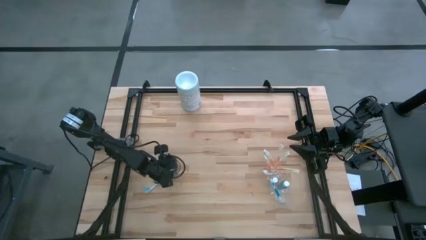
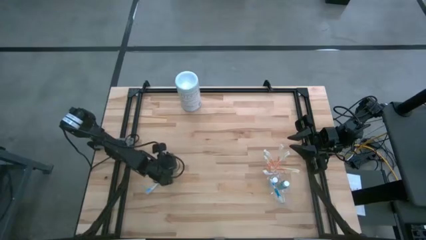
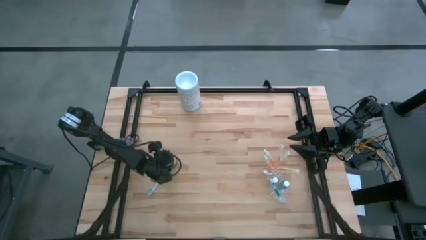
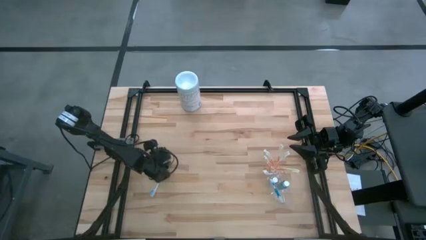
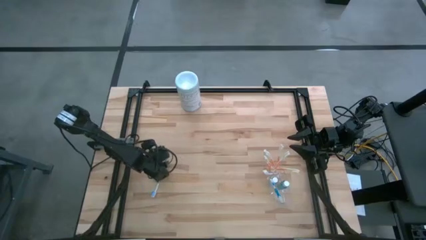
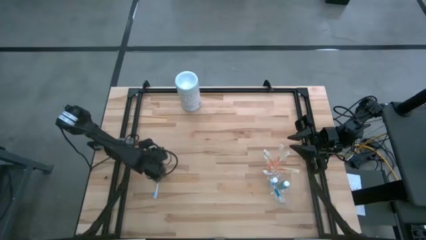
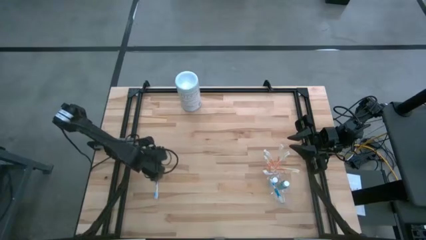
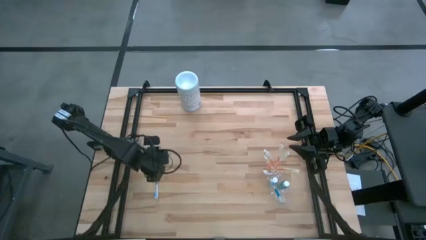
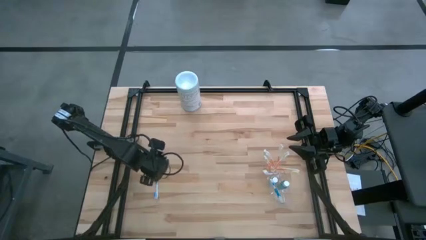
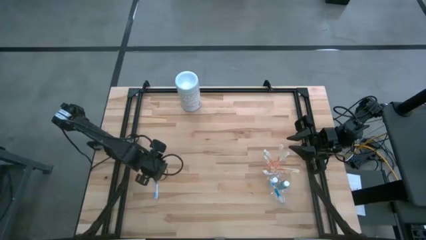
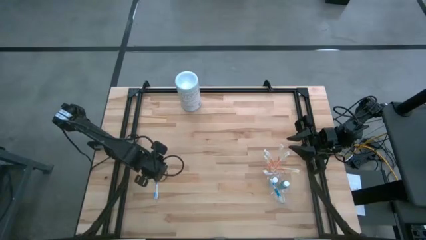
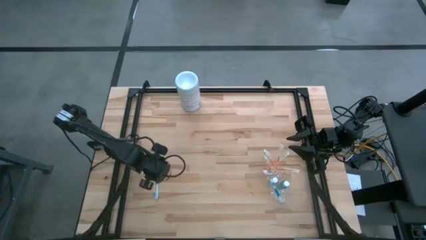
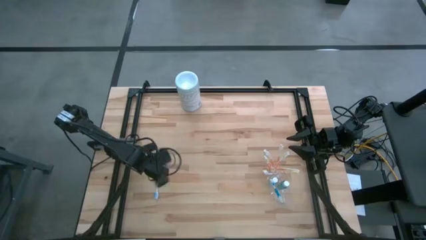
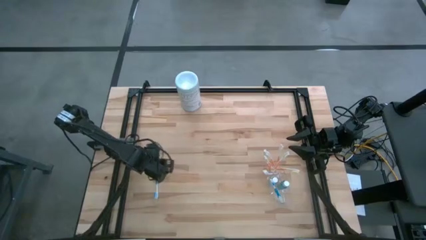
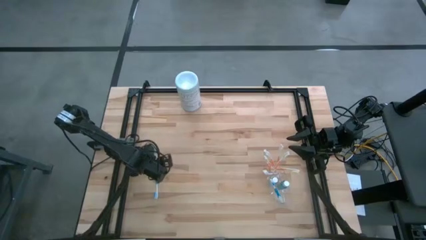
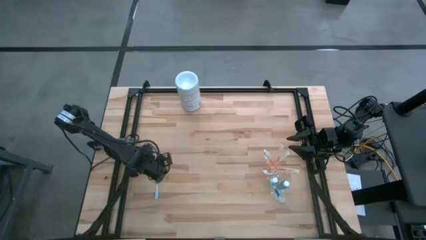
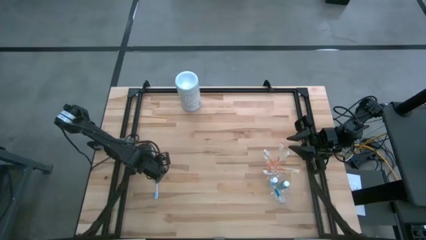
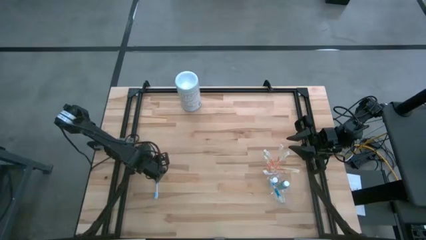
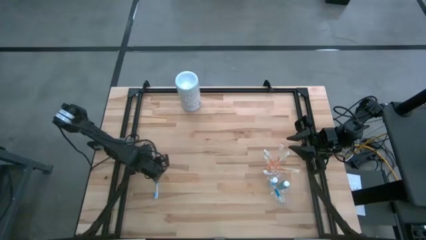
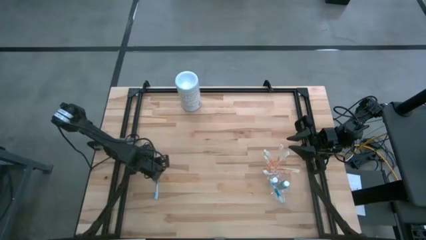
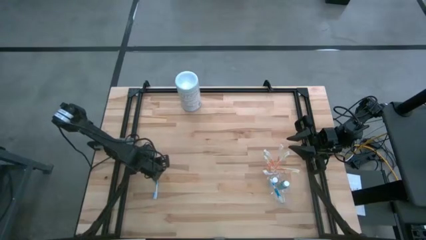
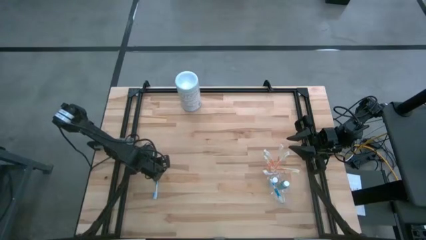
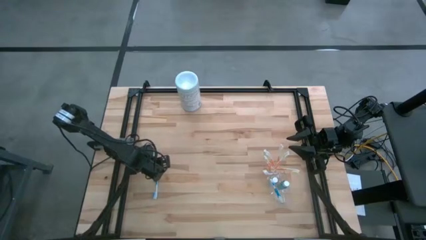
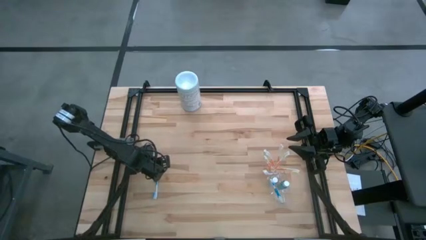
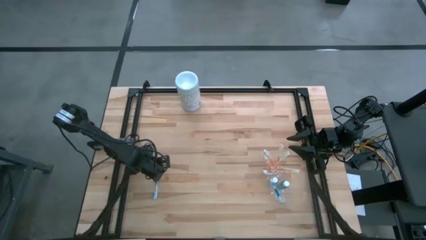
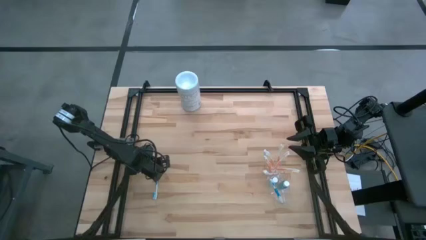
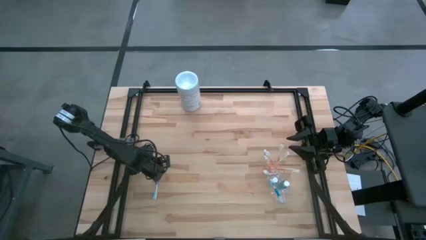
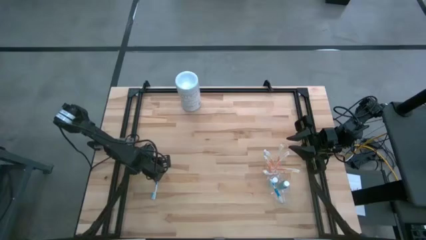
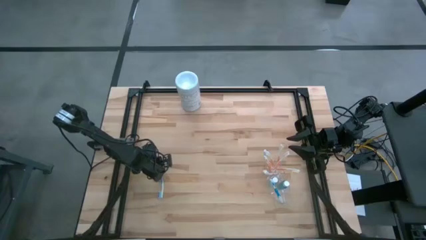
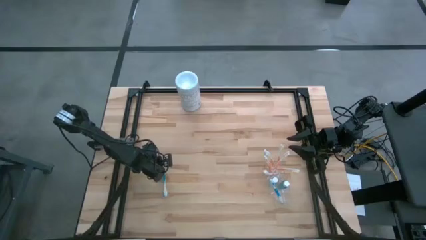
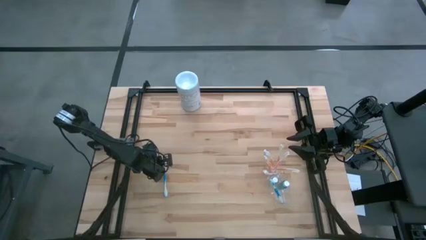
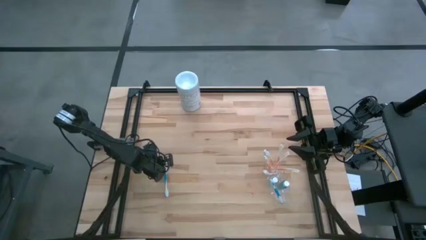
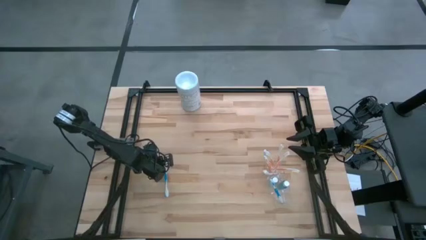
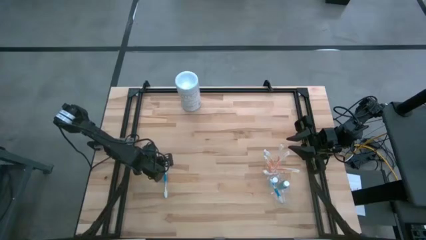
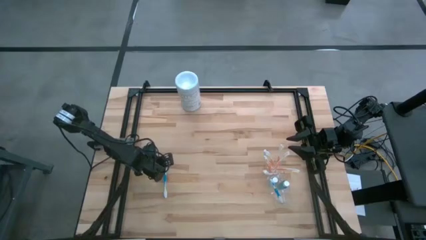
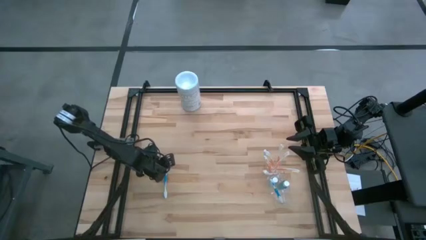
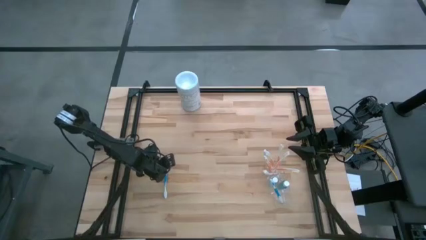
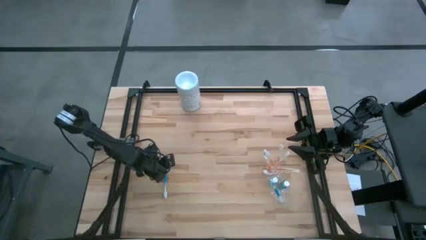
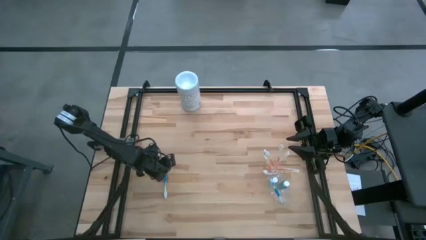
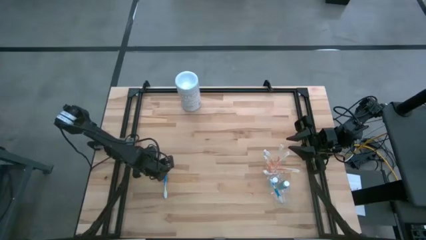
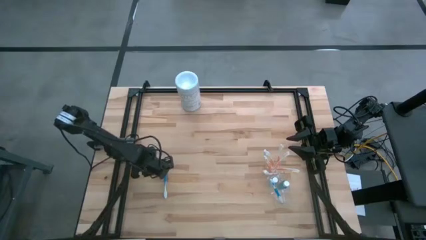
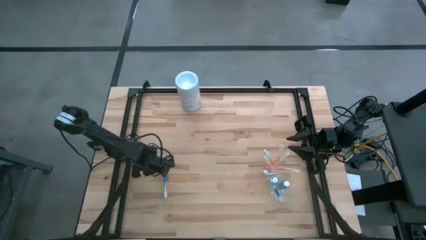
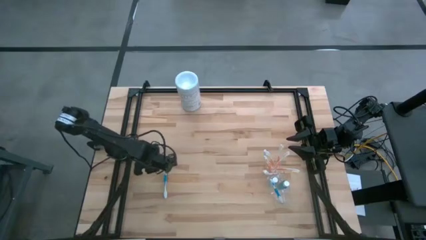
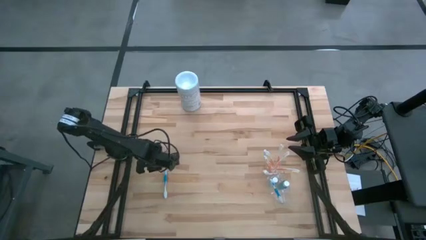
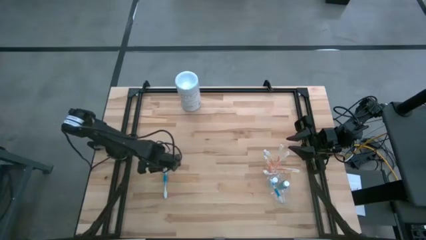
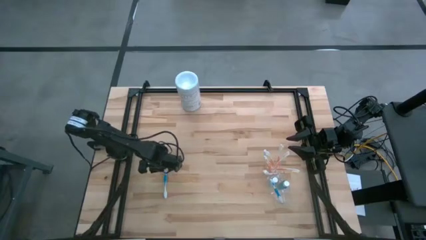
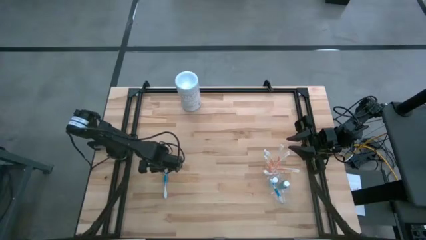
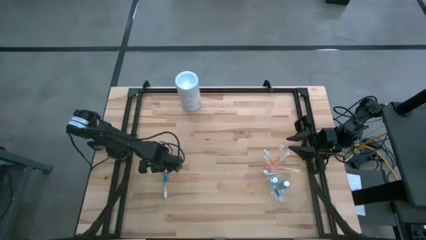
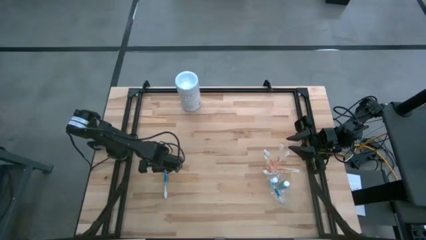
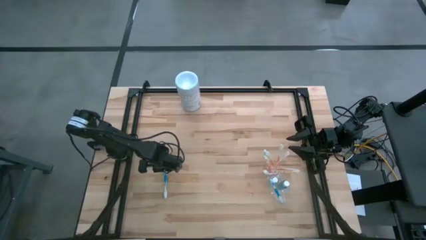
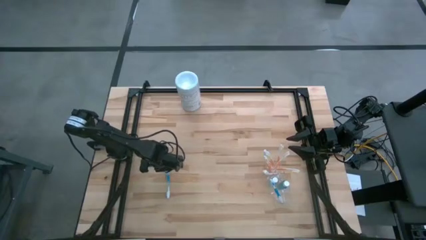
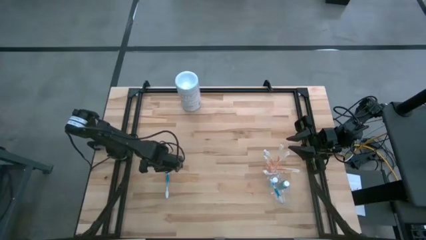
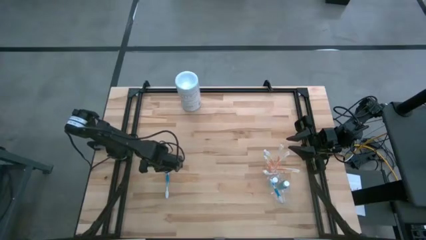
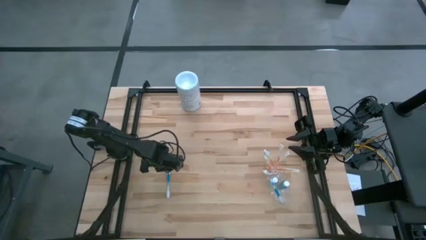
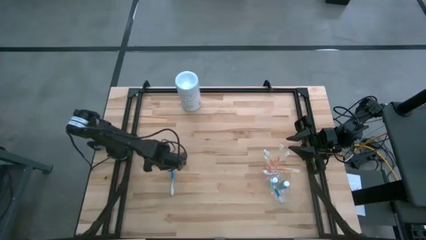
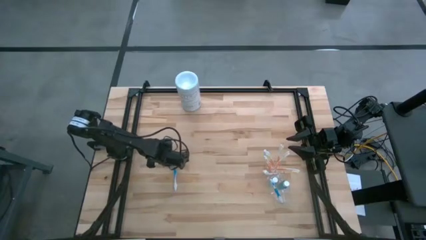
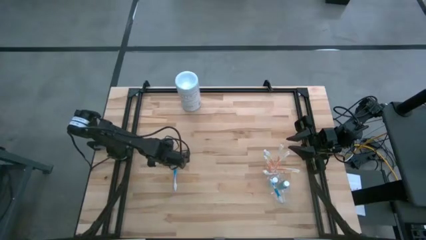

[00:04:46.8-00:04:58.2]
Task: Pick & Place toothbrushing station
Put the blue toothbrush into the bottom section of the transparent organizer

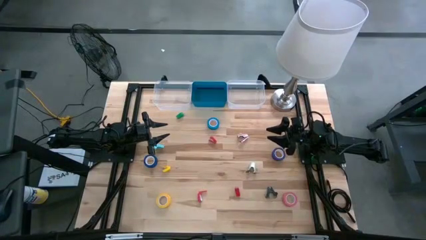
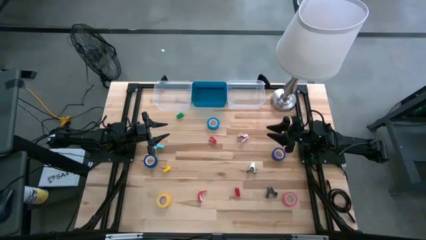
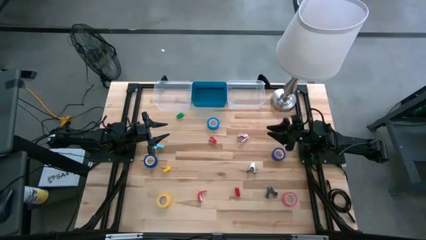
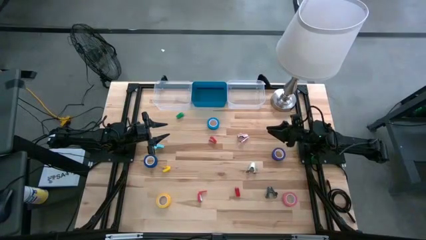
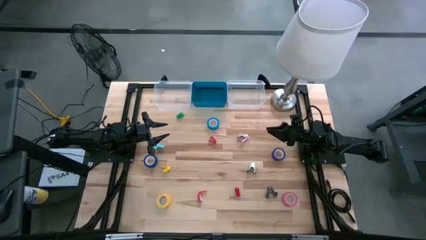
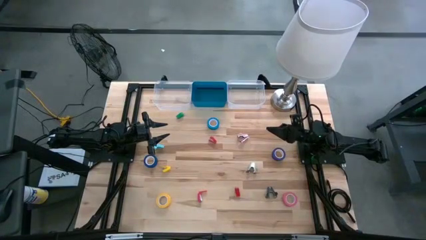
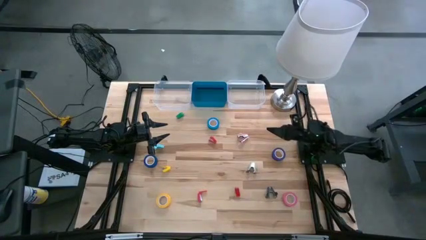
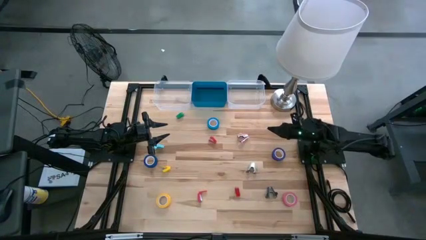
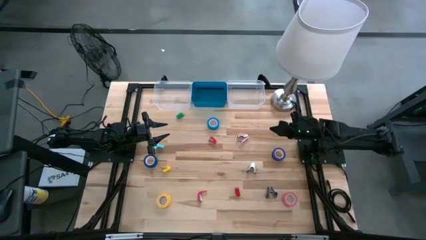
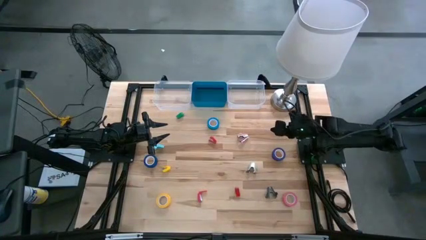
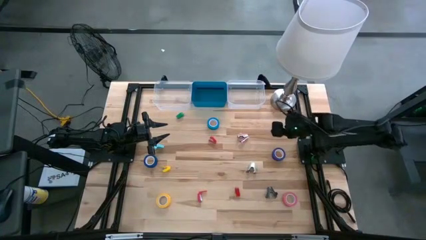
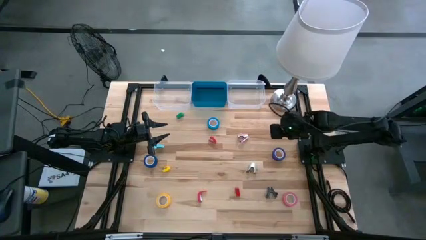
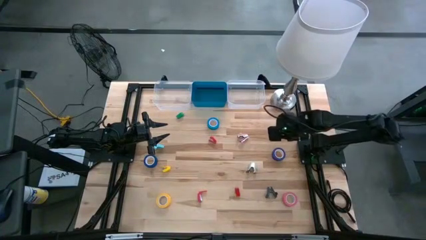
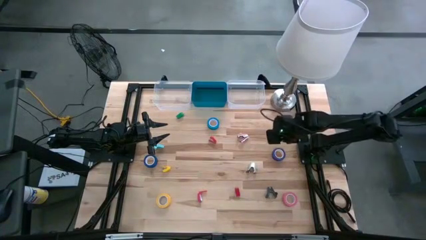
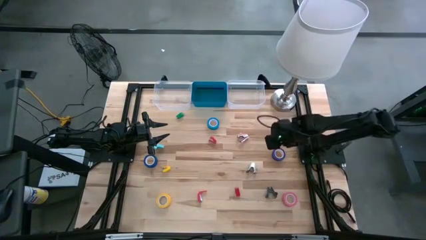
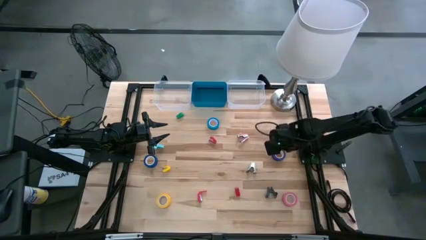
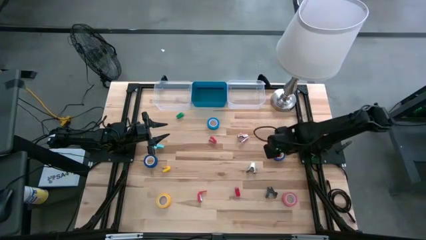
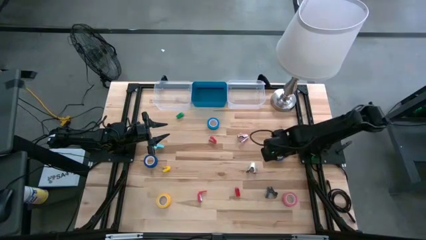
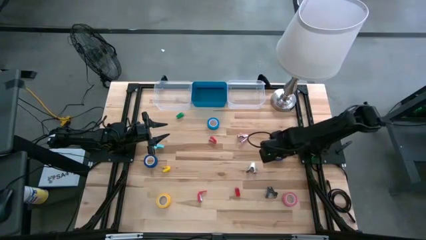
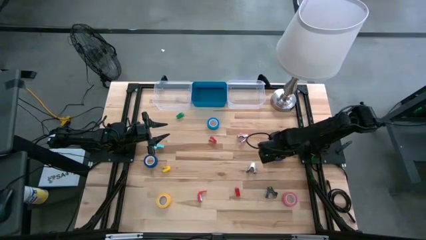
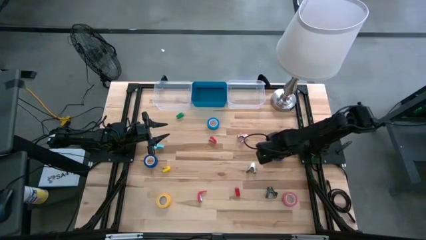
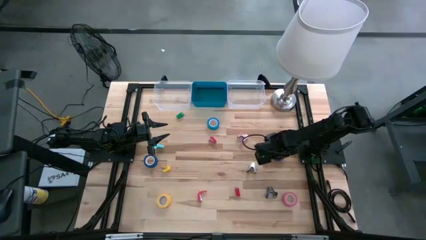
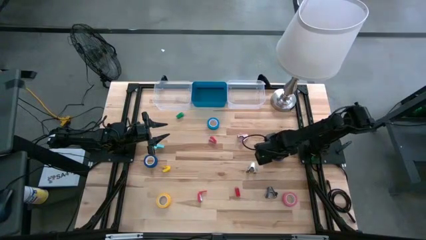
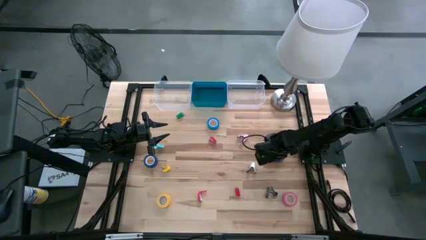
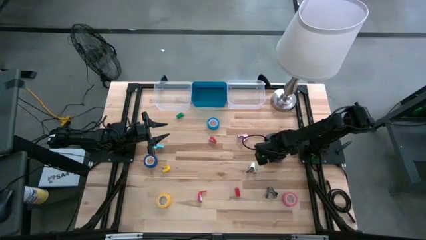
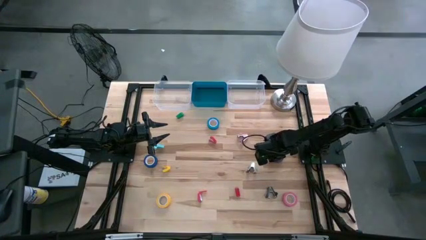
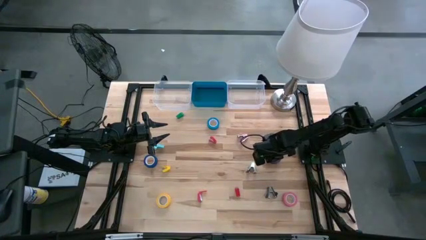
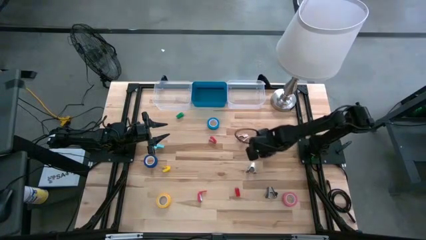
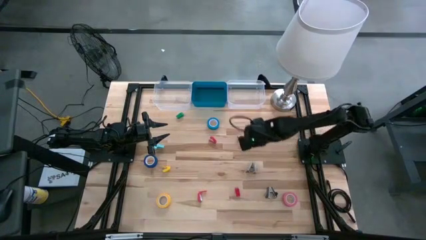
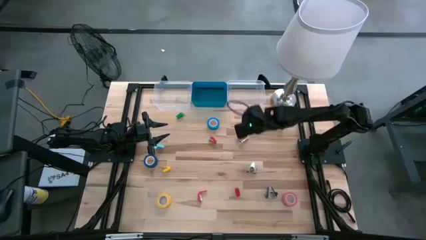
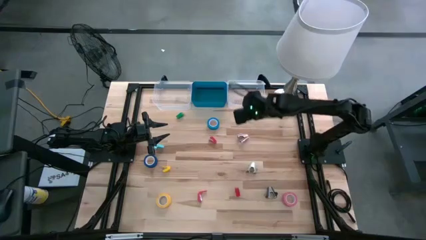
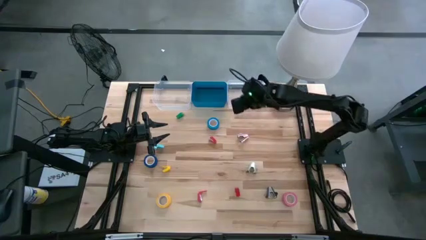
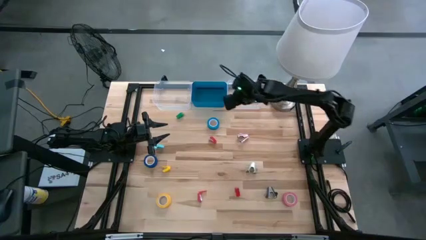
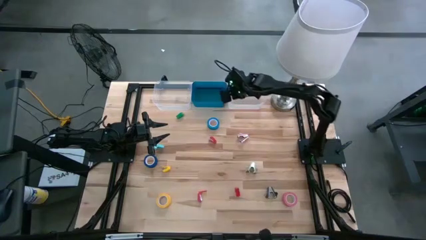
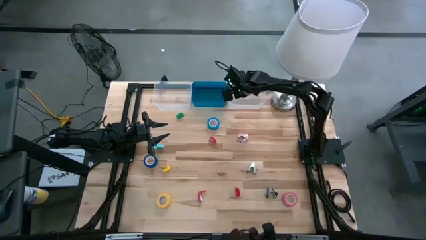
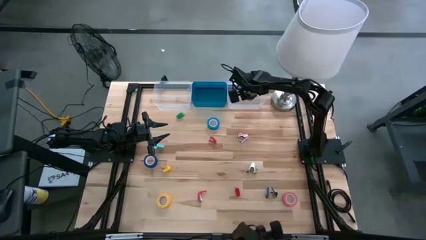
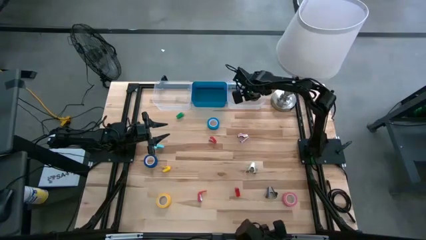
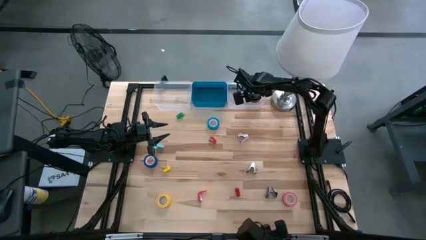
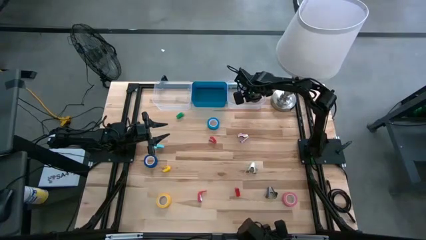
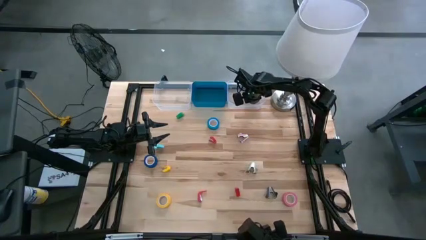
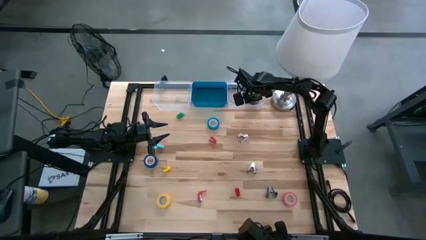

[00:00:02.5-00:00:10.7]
Task: Pick and place Stapler, Stapler remover, tape
Put the dark blue tape into the right transparent bin
